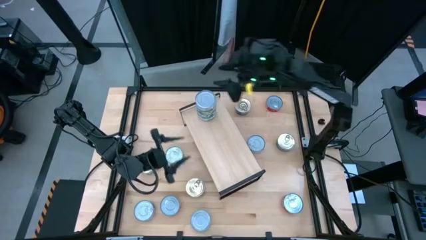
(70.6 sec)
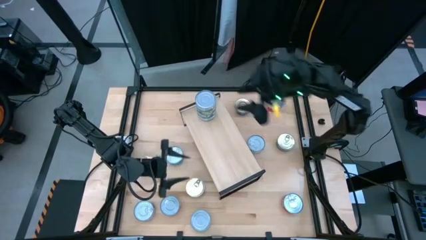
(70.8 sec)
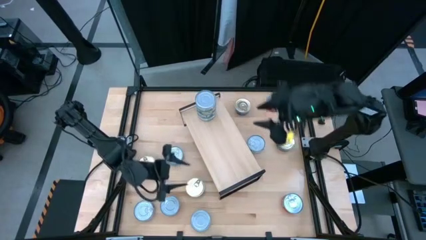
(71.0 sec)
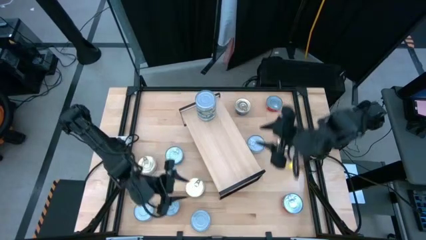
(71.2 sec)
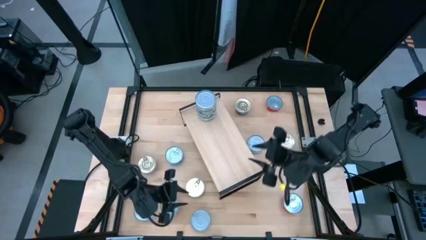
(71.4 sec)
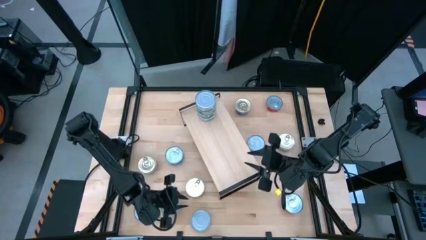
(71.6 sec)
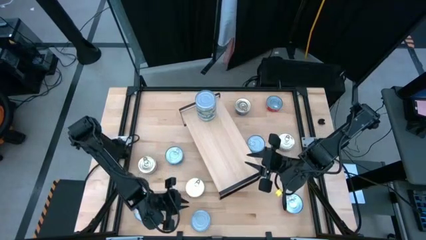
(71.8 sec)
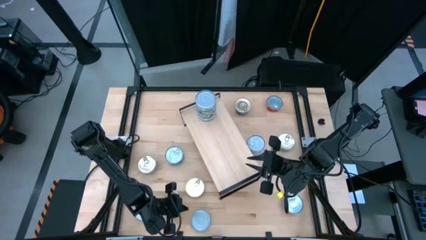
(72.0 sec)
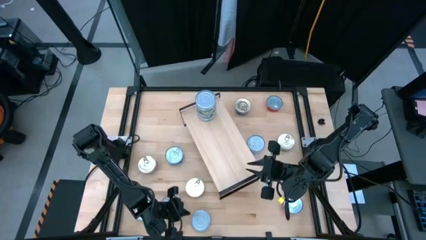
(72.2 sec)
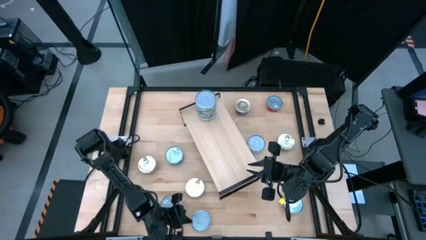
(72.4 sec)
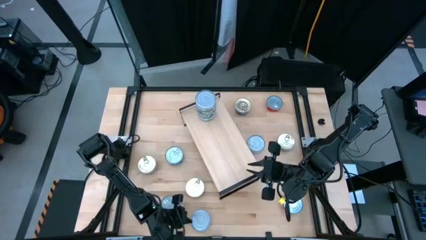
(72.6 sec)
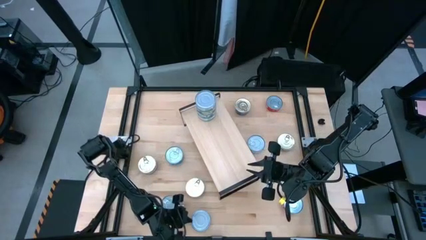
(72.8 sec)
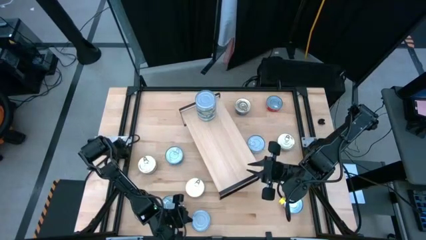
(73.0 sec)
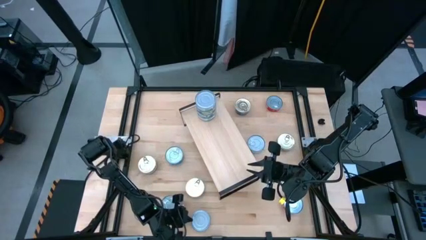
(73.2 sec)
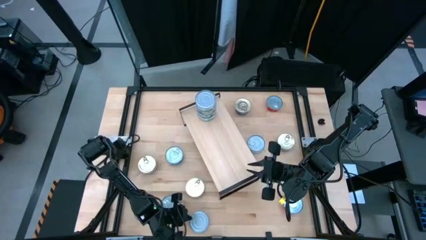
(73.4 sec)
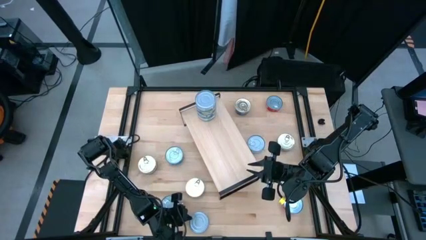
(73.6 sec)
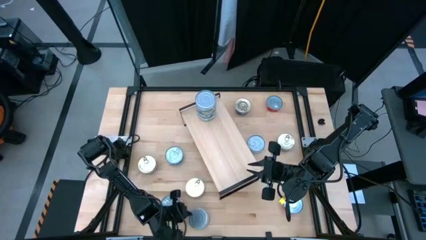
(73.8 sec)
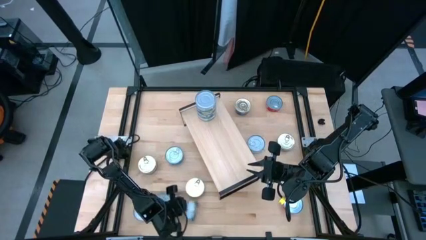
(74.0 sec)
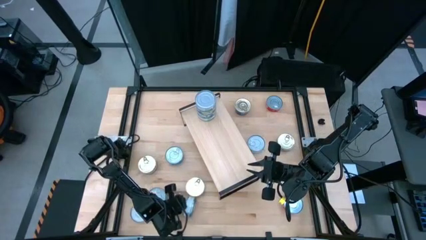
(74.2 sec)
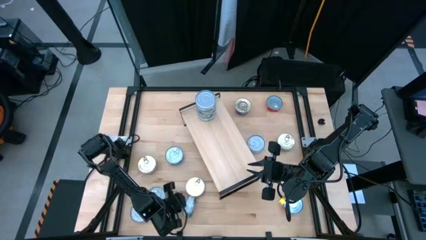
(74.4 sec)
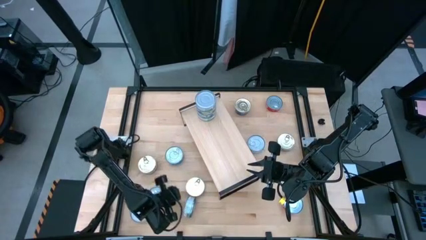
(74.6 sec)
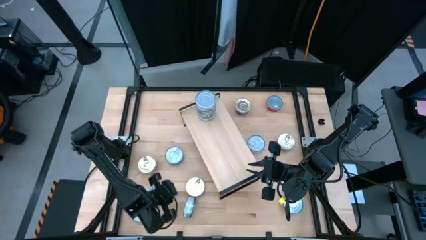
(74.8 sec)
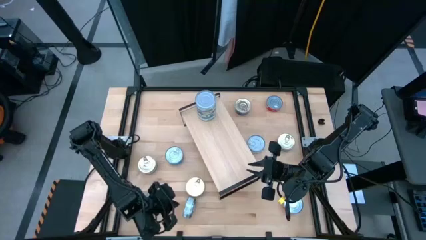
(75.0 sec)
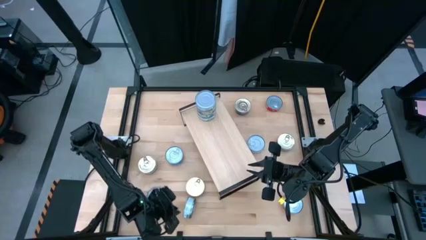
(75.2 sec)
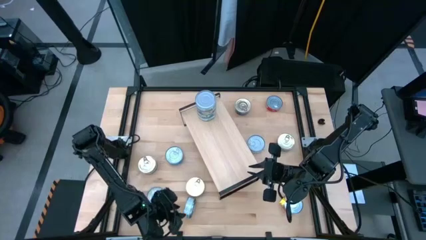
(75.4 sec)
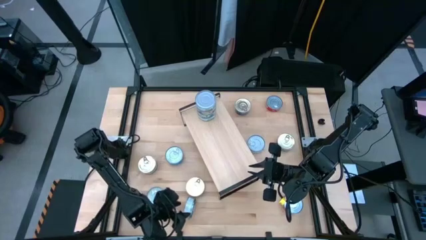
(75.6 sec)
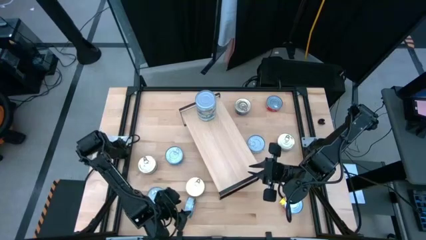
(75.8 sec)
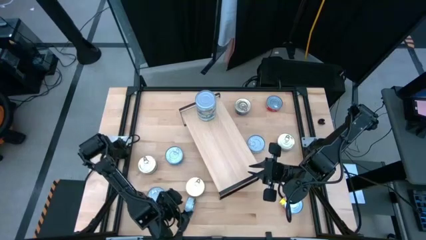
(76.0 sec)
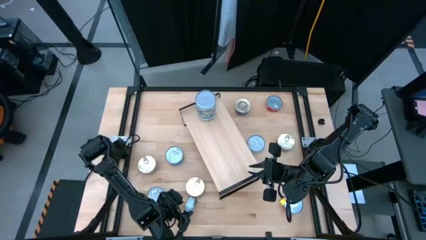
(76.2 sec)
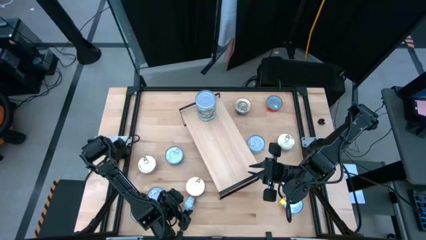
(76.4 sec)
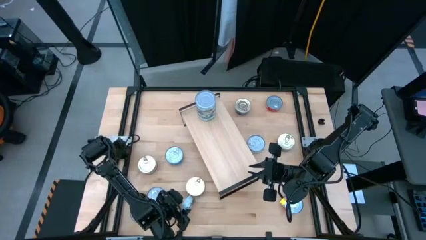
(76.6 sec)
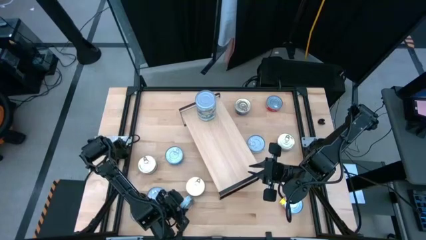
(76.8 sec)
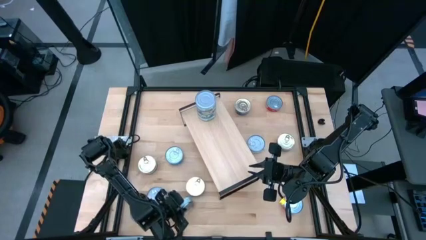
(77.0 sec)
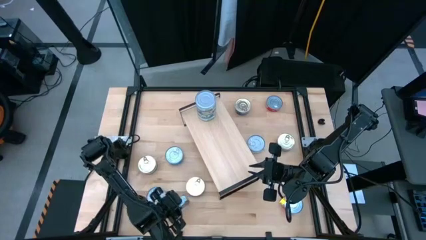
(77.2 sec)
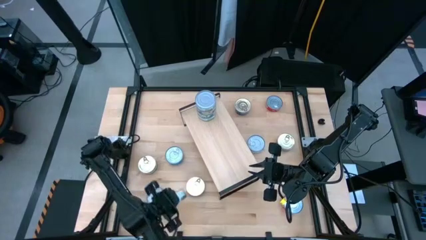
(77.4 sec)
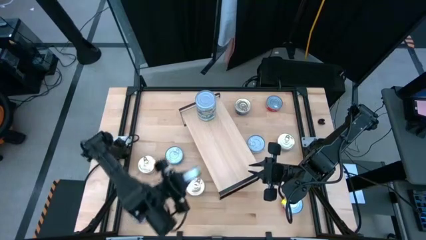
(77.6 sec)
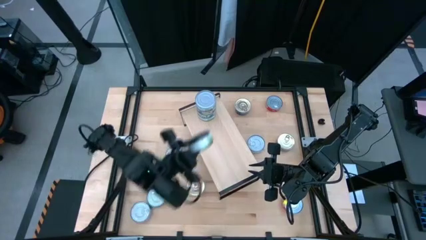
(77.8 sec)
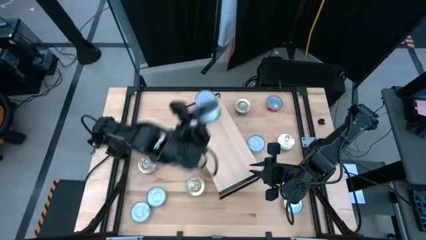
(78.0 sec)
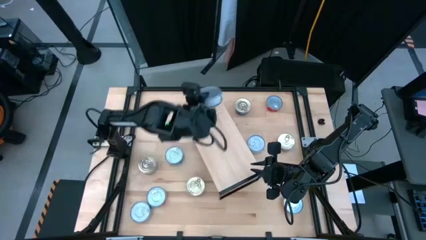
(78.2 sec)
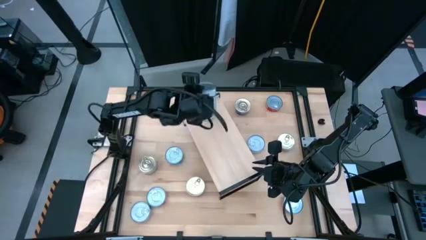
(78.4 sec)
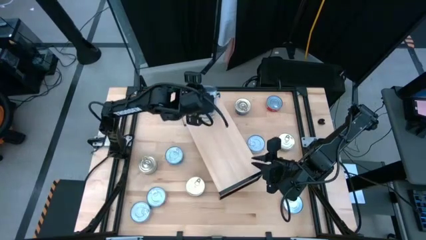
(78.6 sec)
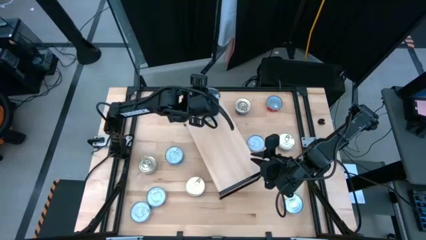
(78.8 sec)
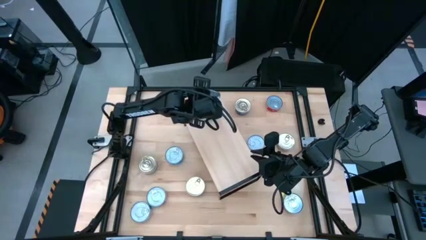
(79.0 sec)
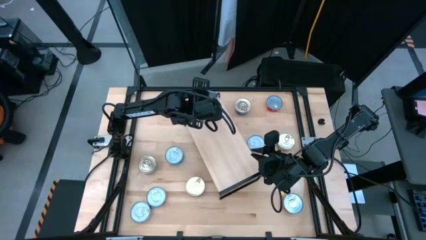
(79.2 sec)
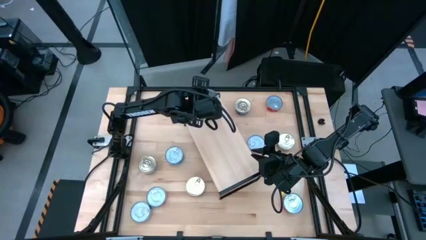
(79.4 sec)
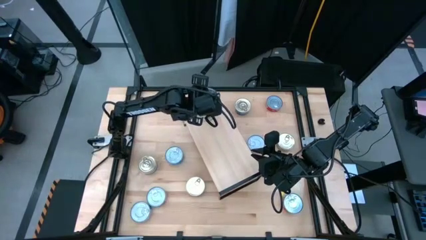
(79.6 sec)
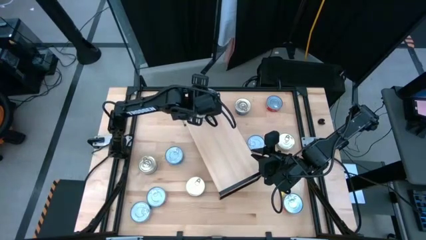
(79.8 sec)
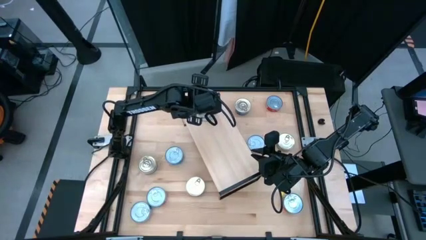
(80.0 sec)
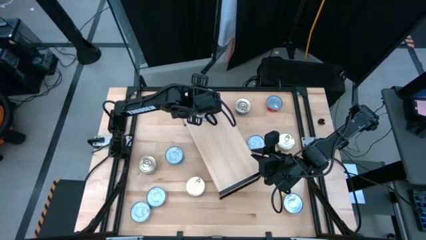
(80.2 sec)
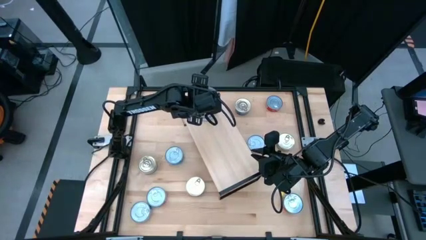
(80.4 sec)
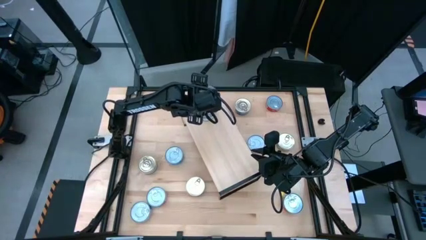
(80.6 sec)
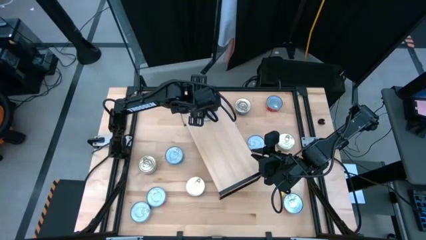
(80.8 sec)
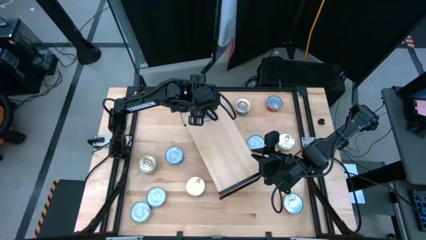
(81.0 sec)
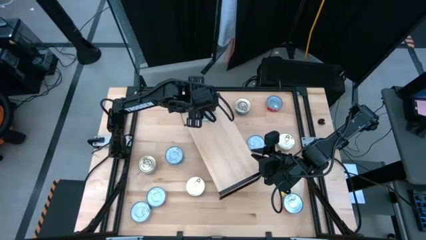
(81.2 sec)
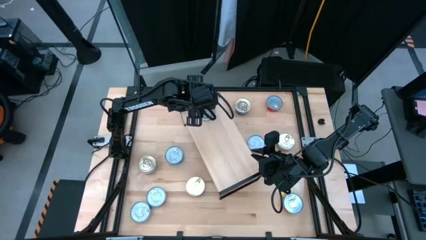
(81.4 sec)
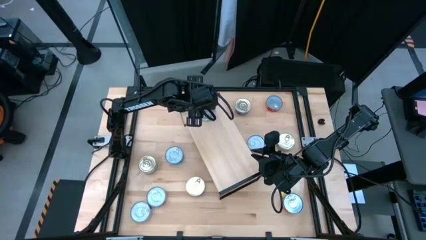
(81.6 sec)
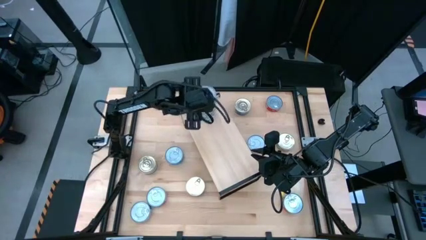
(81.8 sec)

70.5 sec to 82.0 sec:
Task: Stack canned seafood by type on shelf
Stack the green tuna can on top of the other tuna can on the shelf
